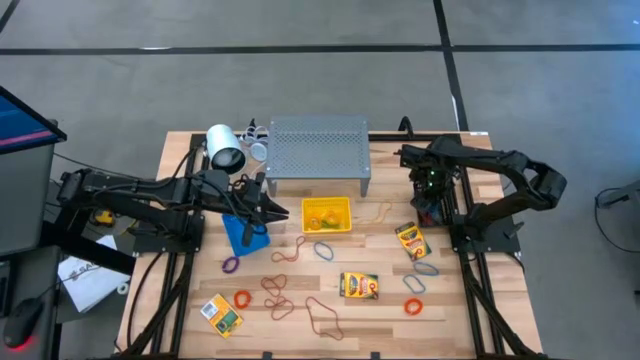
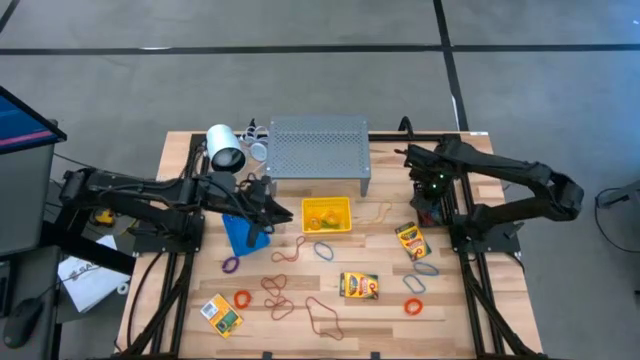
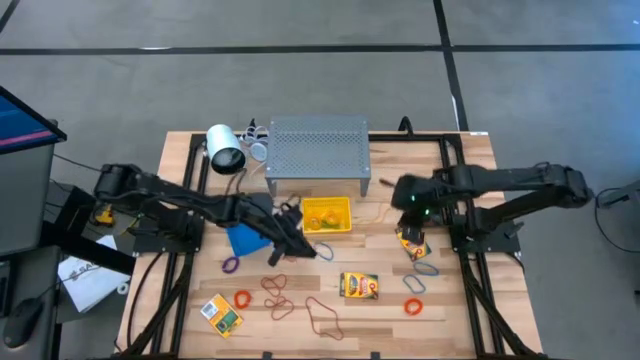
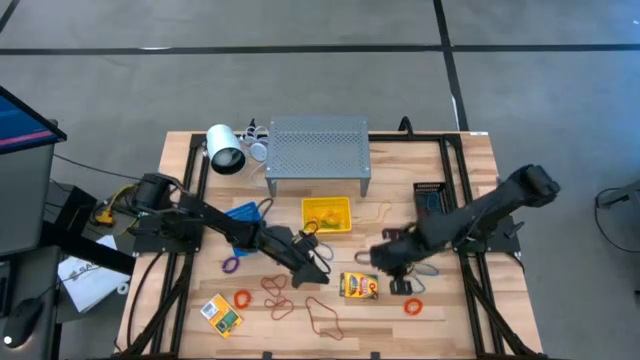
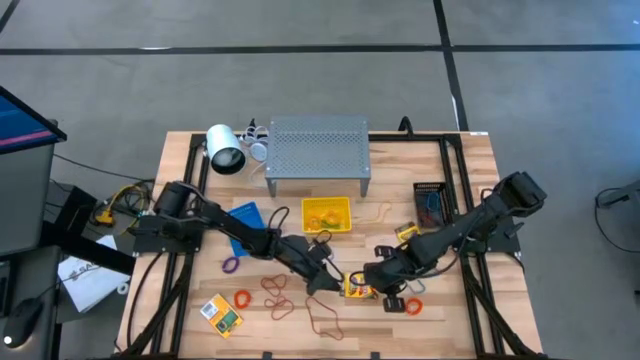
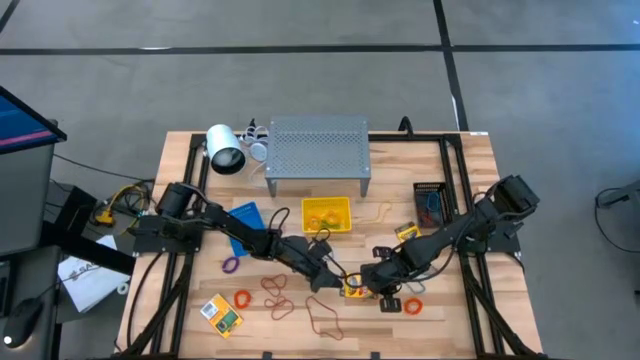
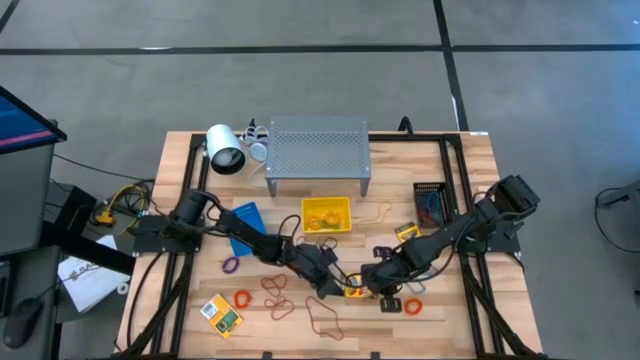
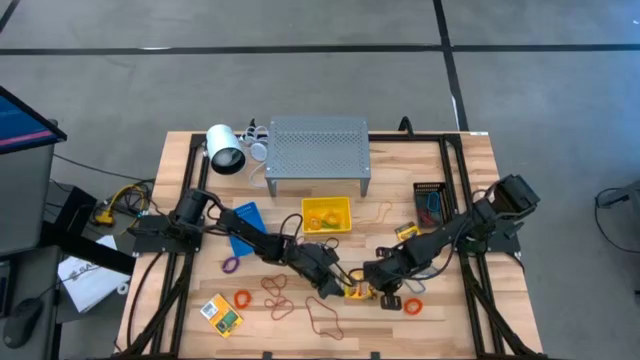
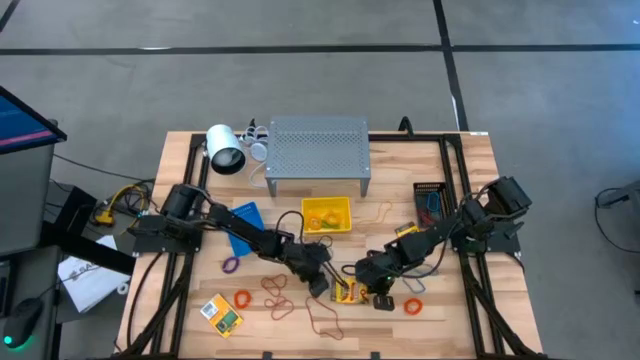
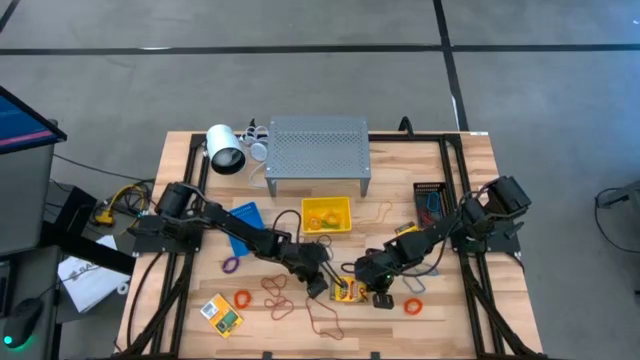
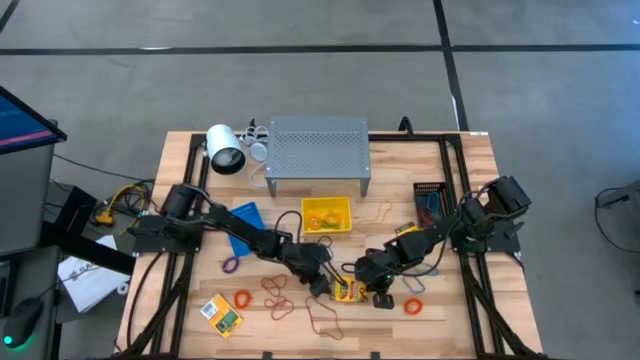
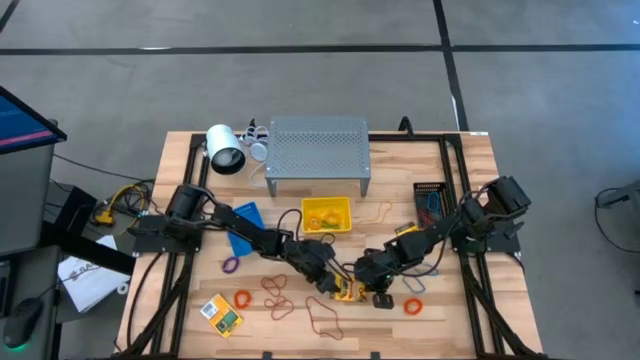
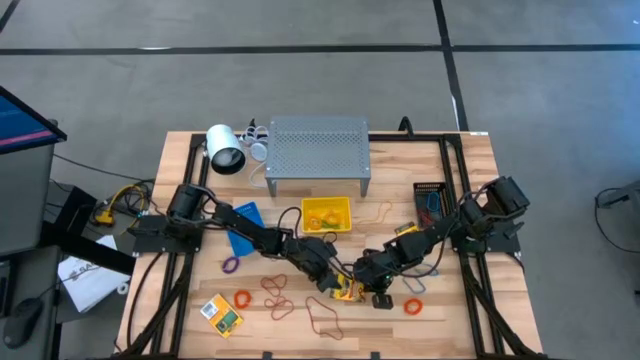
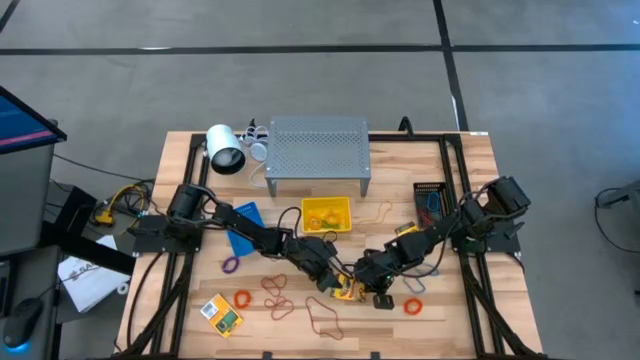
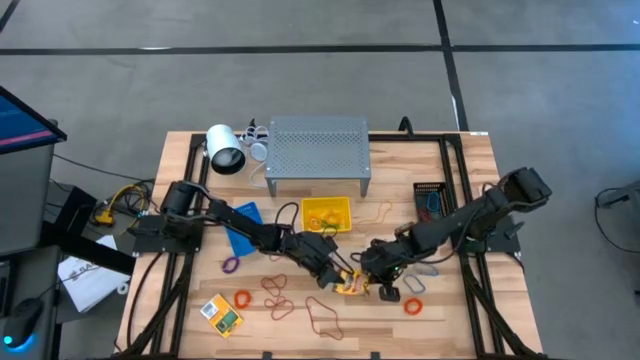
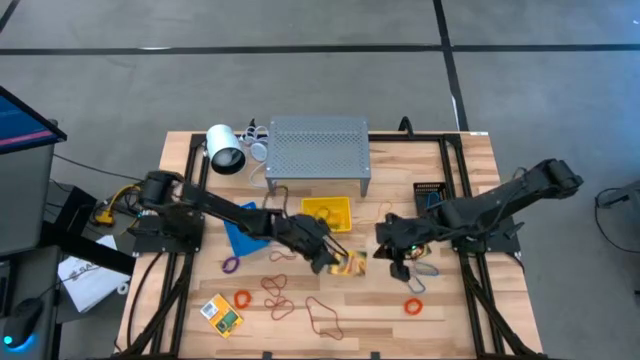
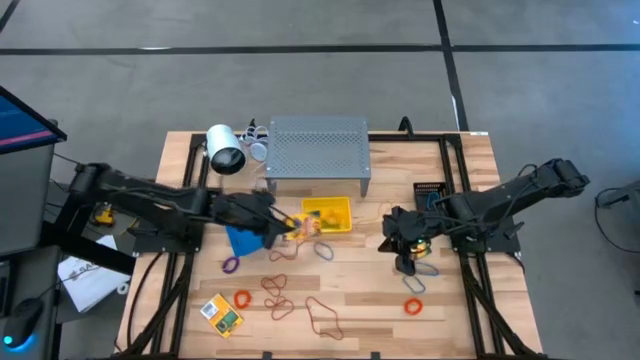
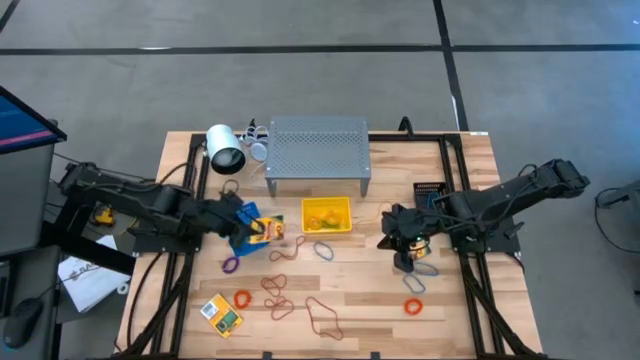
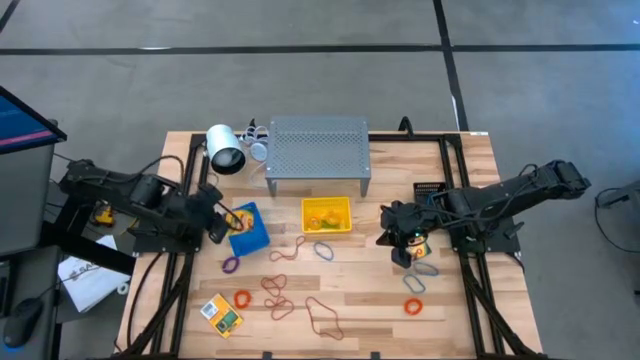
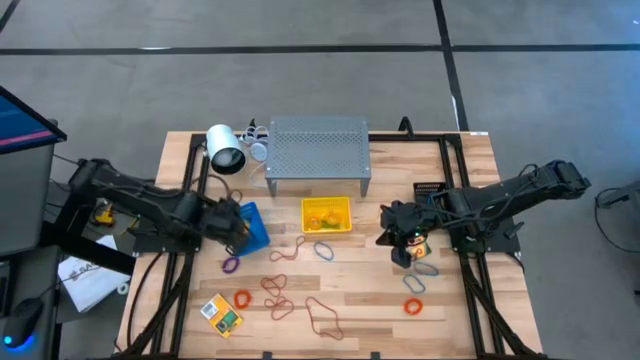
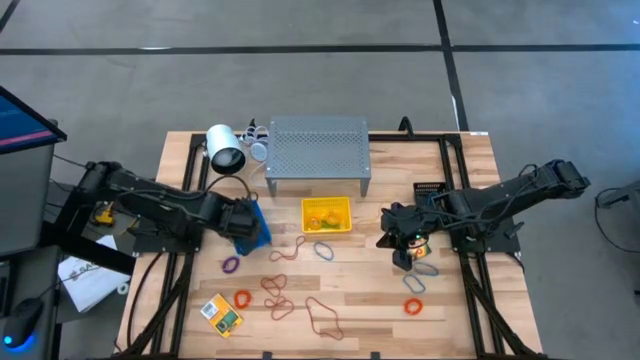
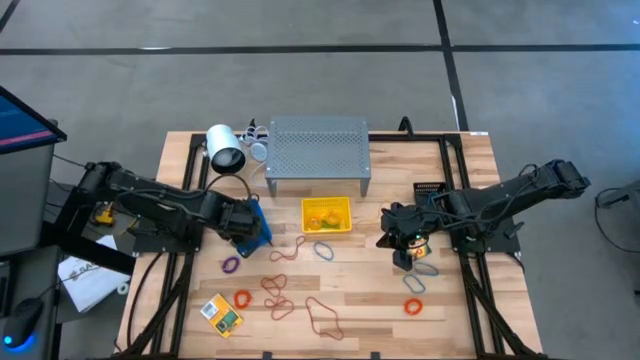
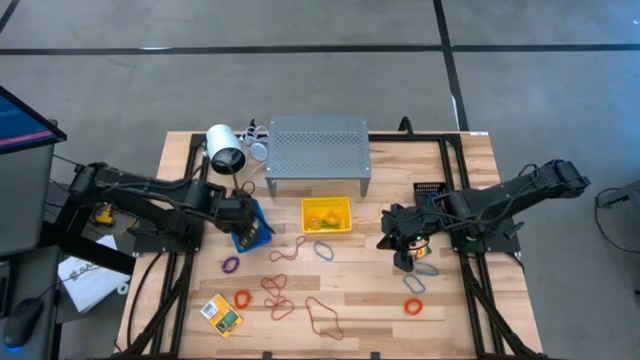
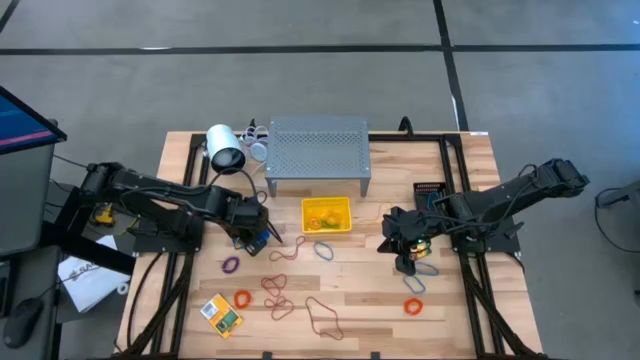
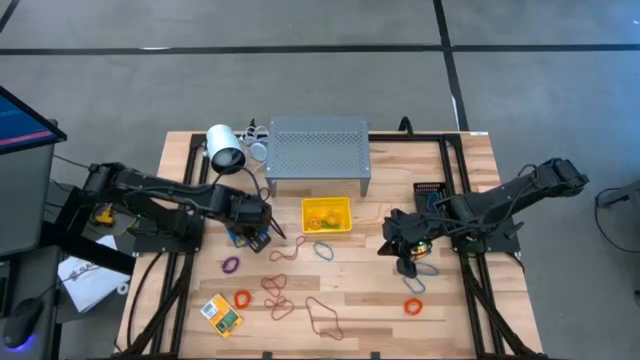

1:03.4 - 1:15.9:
Task: Pick & Place Office Desk Supplies
Put the crayon box into the blue bin

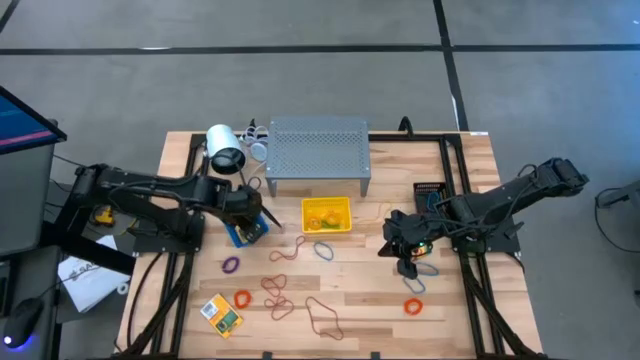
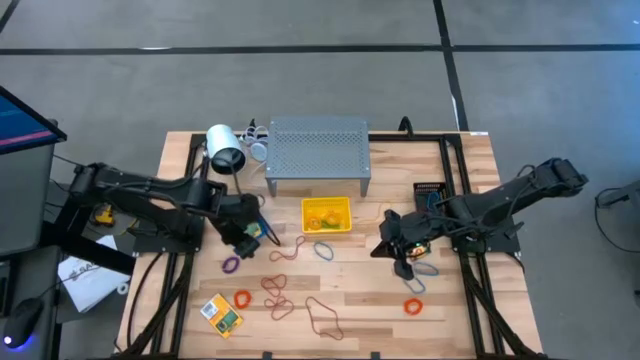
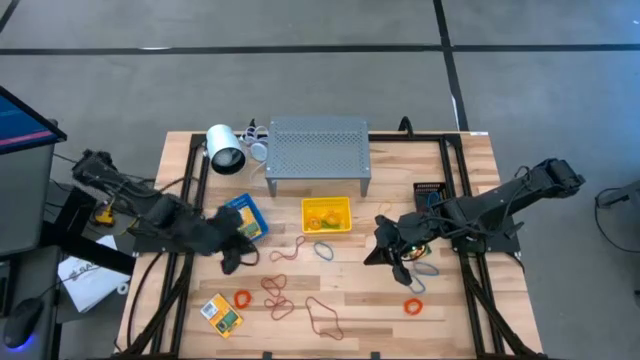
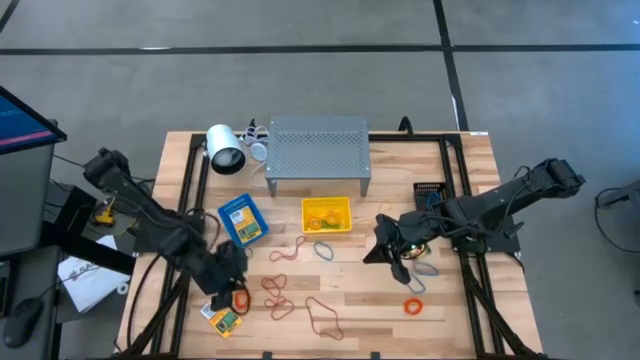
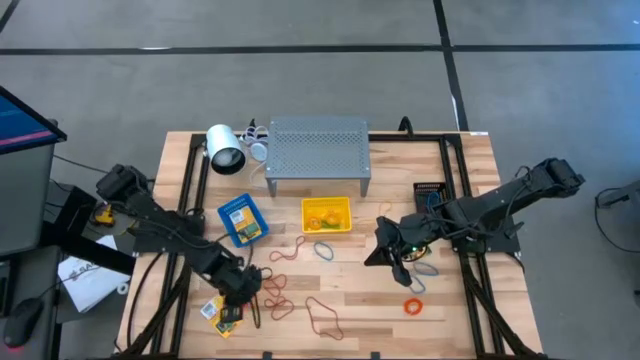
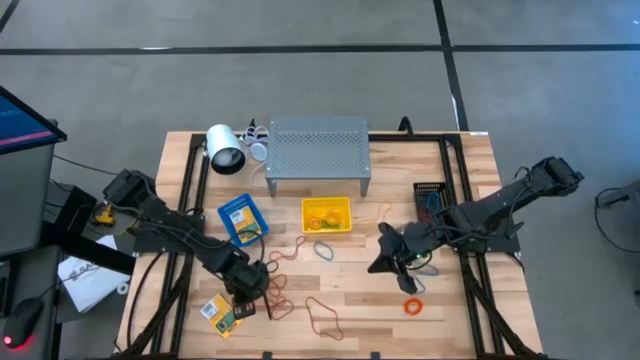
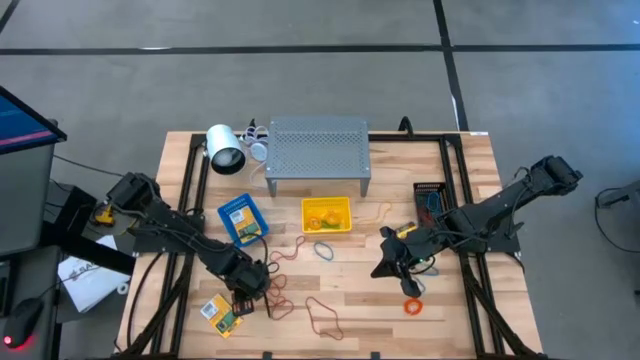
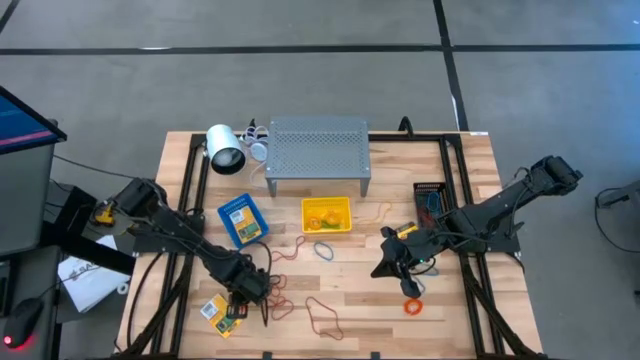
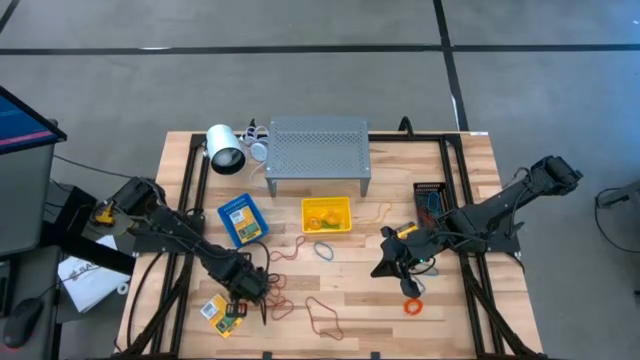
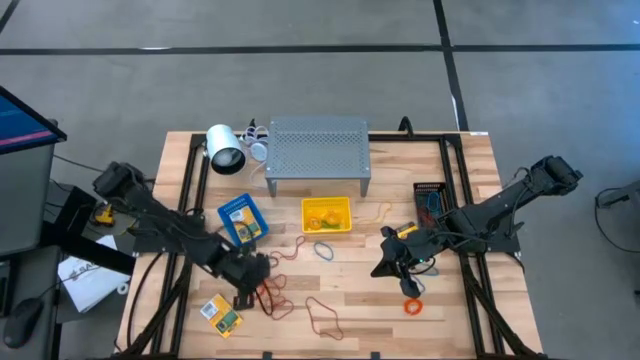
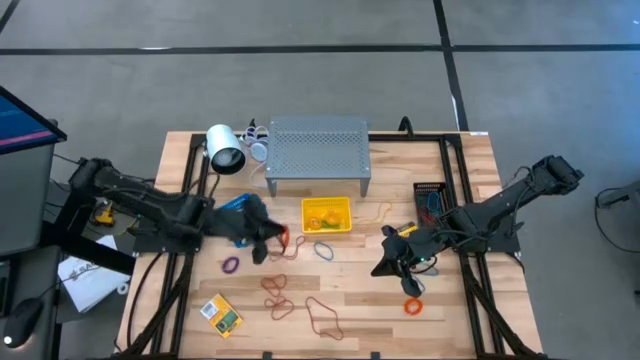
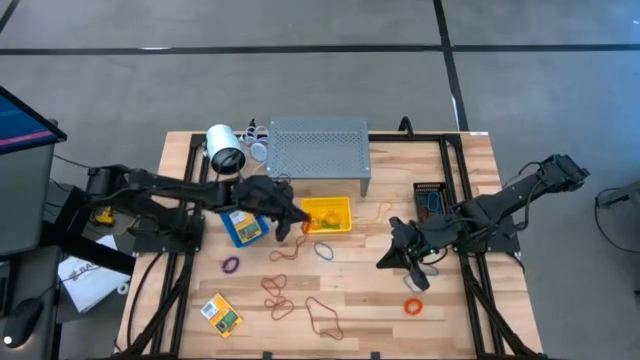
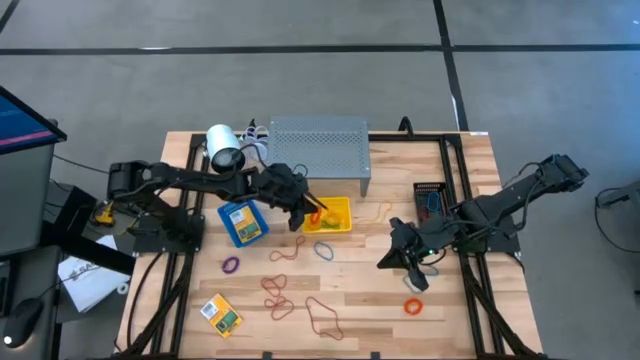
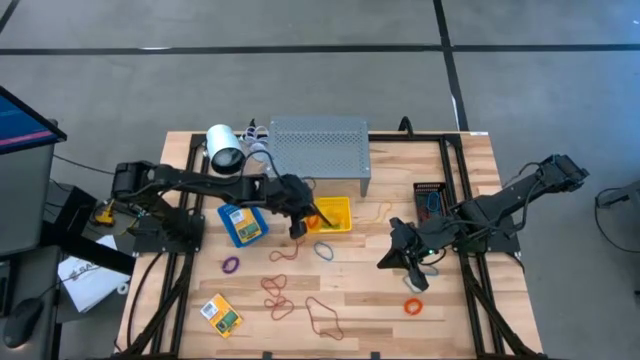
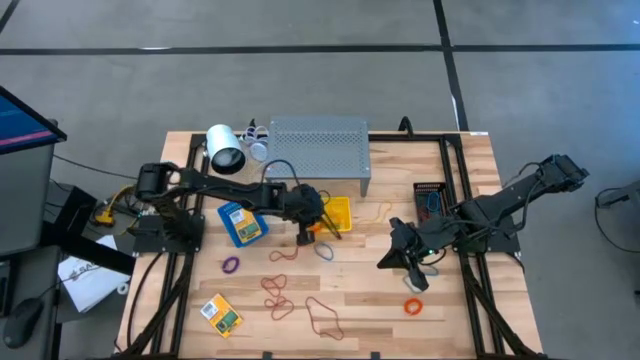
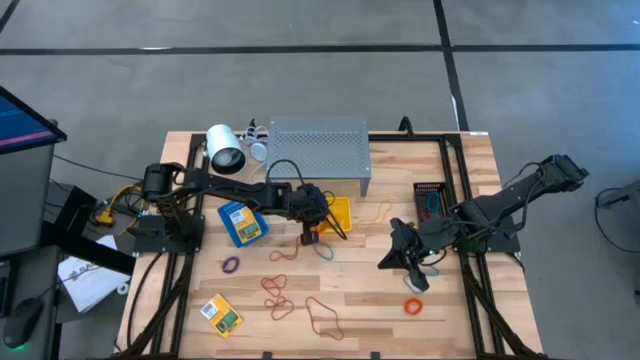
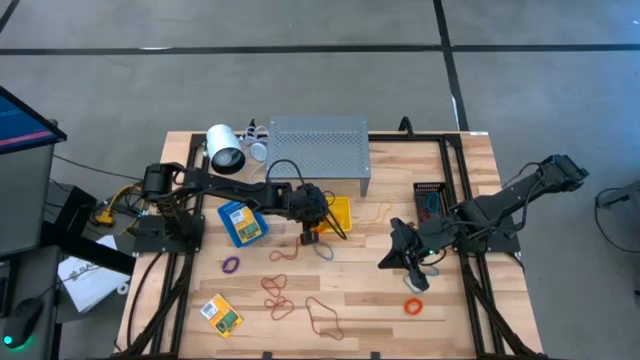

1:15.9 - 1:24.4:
Put the orange spring keychain into the yellow bin

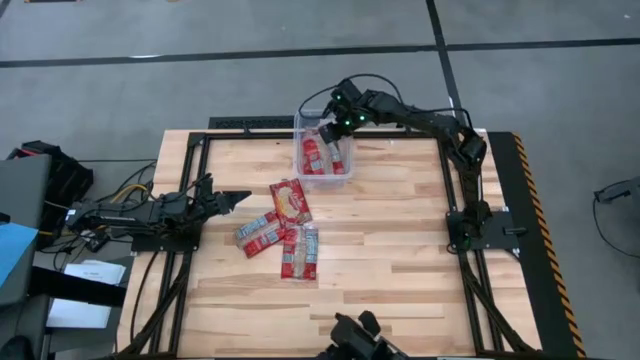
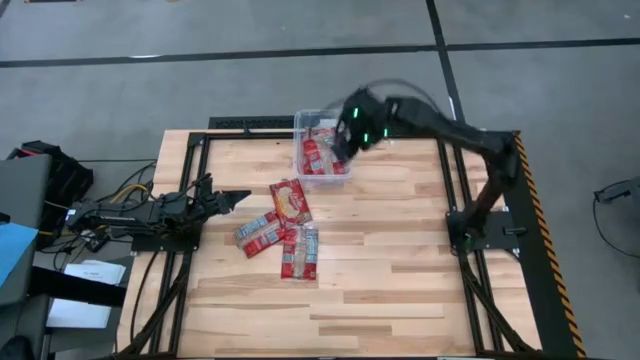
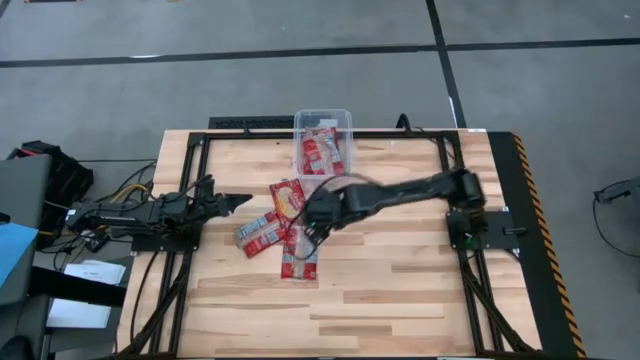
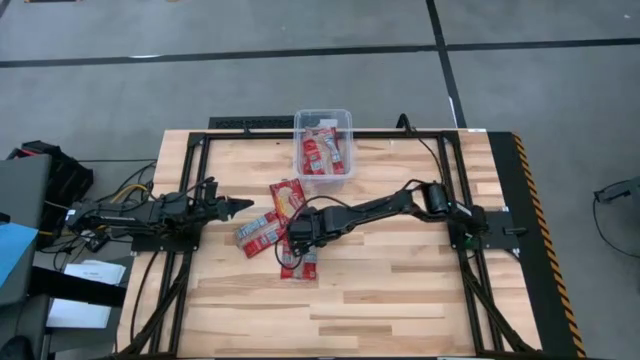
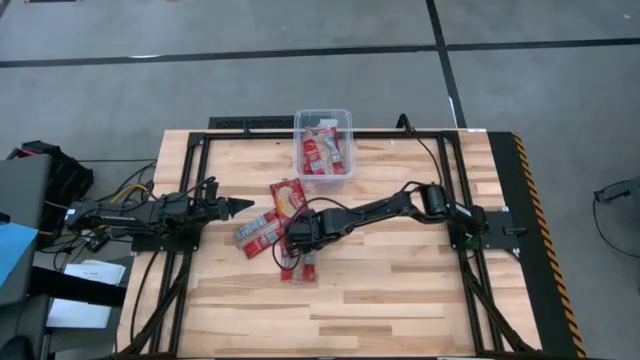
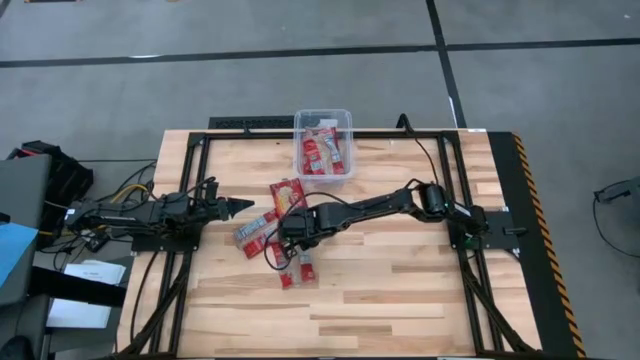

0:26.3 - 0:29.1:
Task: Sort popcorn bags into baskets
Put the red popcorn bag into the transparent bin
